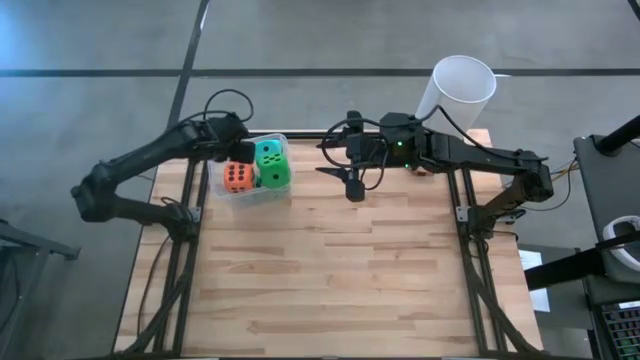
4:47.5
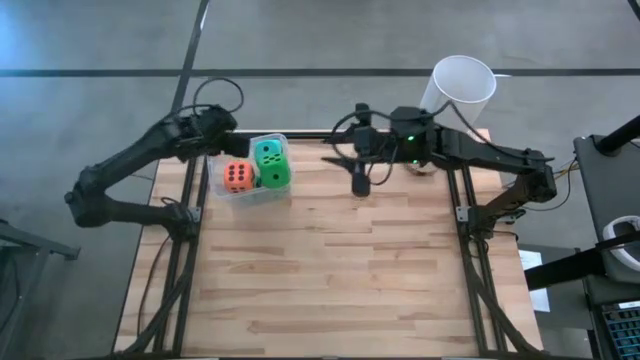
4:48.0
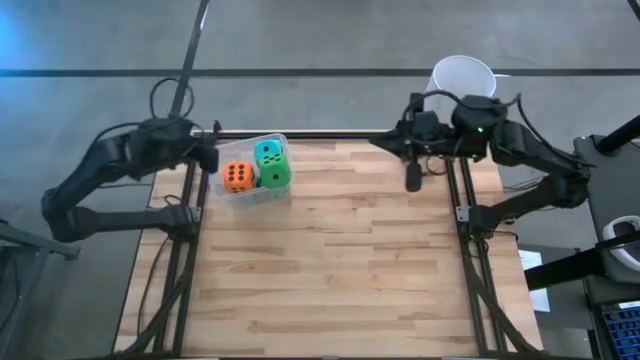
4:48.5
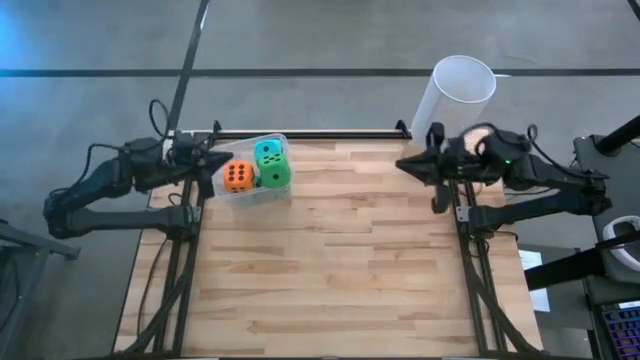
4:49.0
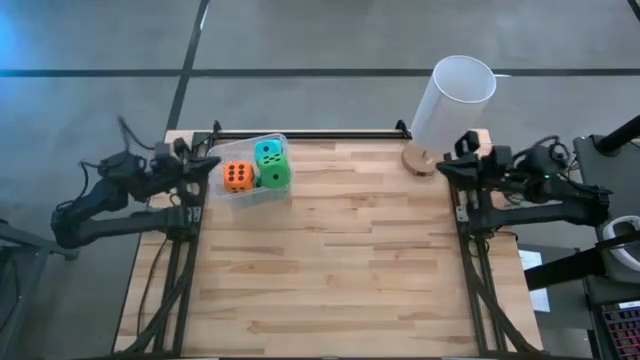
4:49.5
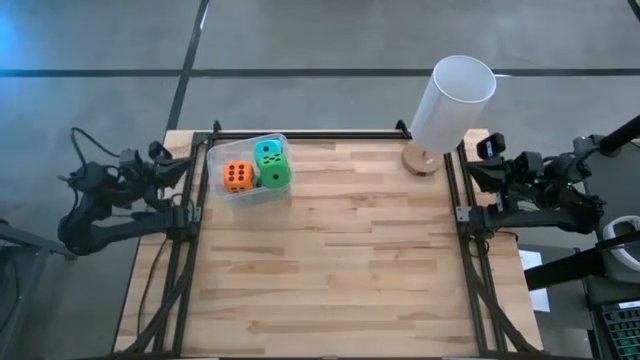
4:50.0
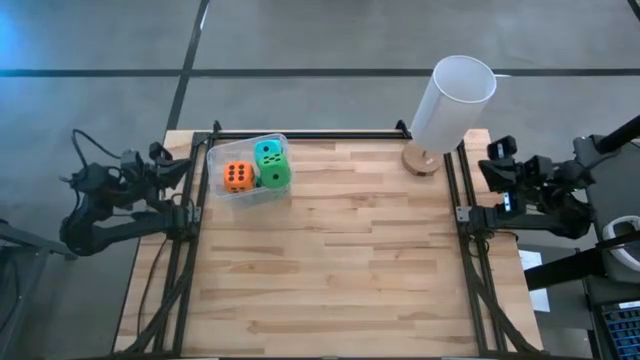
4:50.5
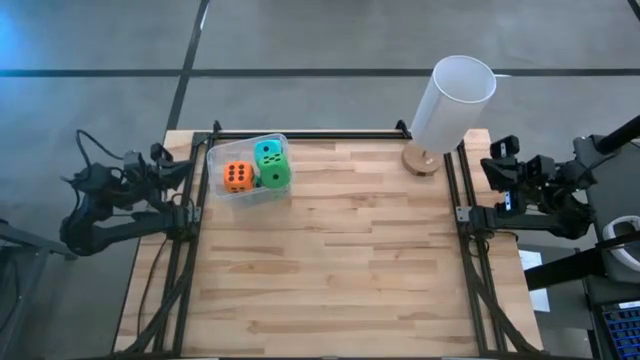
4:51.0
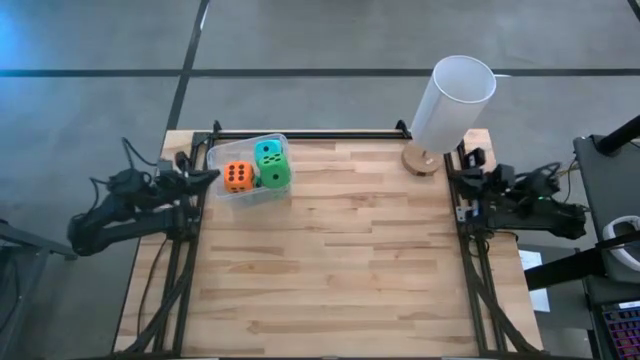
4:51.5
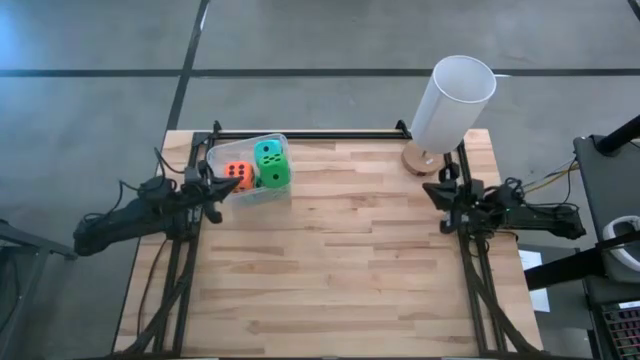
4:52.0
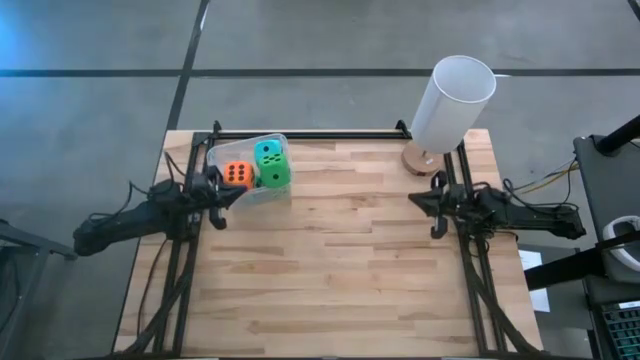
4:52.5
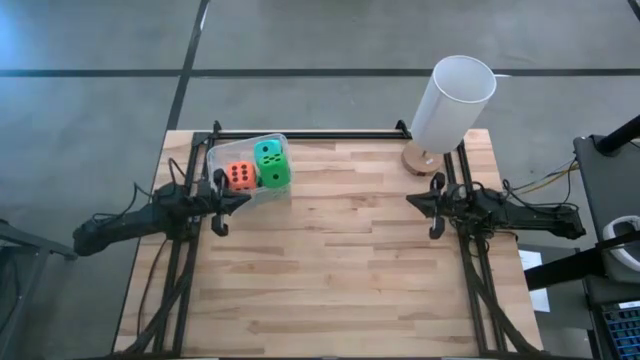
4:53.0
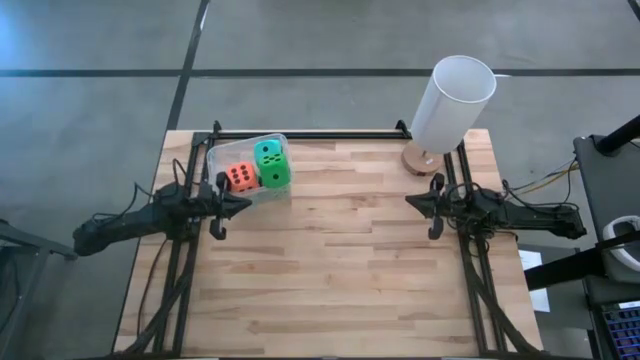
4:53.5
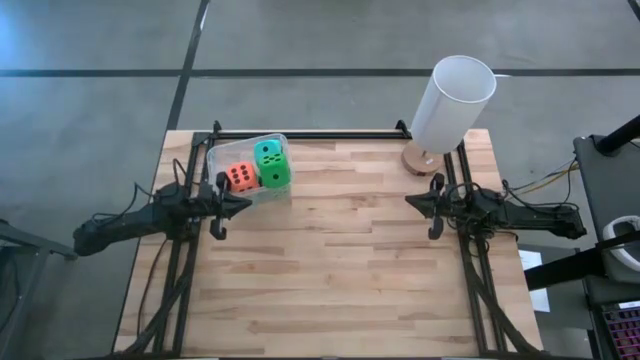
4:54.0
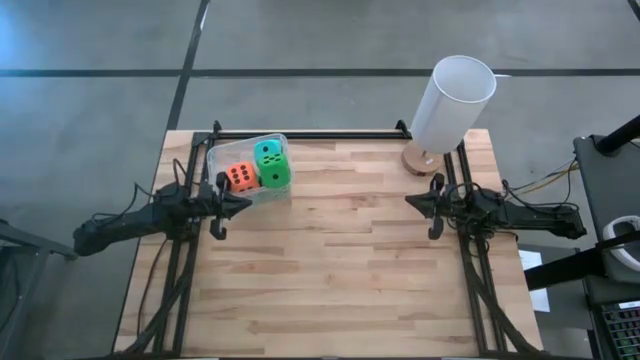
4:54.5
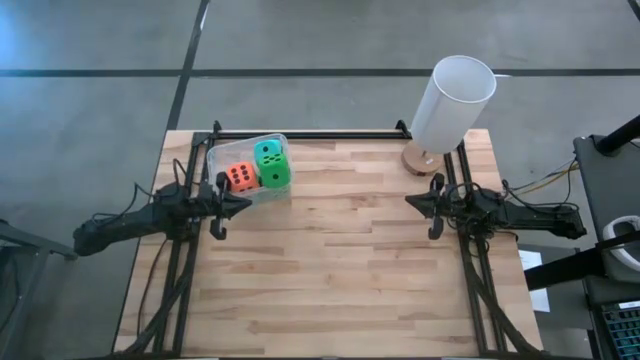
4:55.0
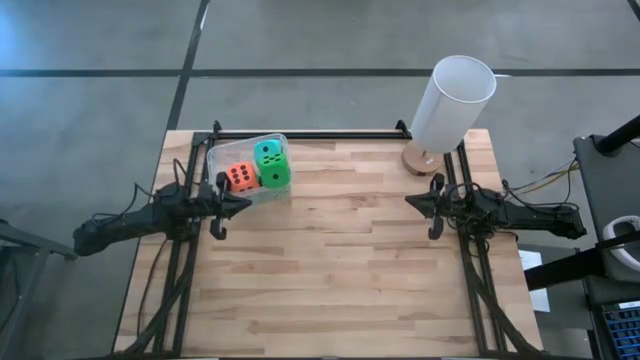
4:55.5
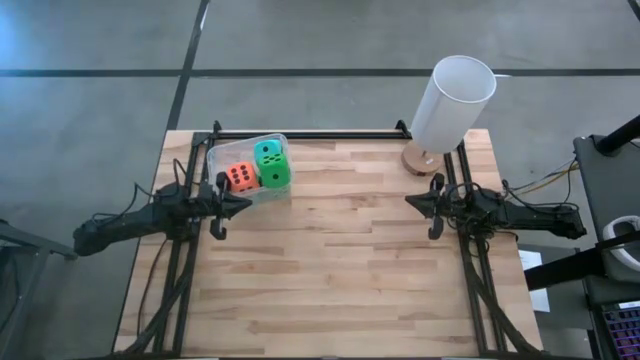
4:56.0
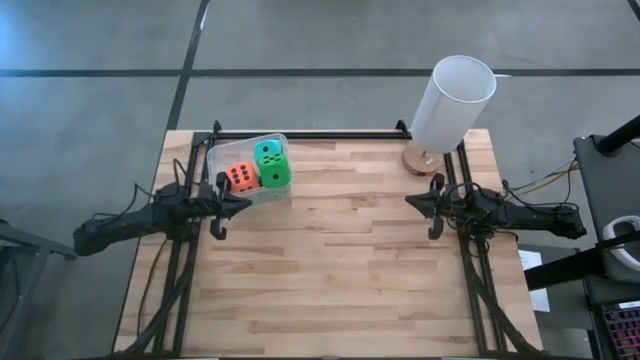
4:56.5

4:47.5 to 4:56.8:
Task: Pick & Place Dice
Return to Home Position

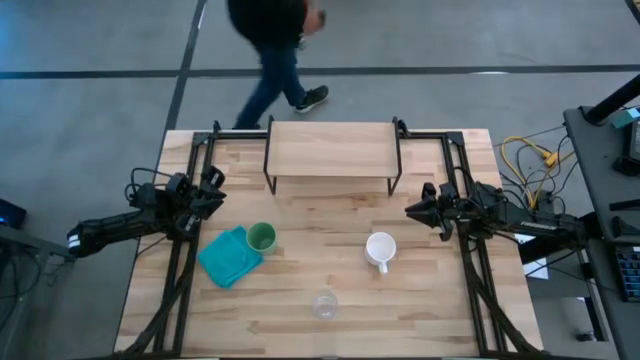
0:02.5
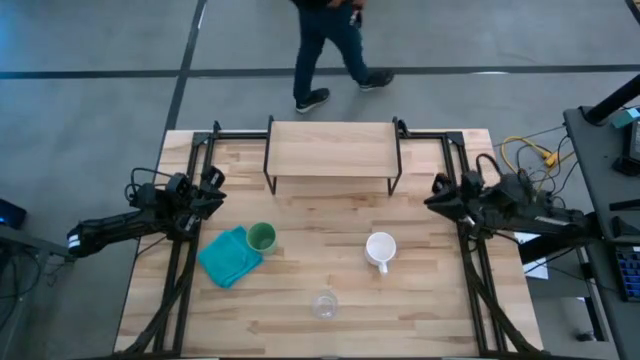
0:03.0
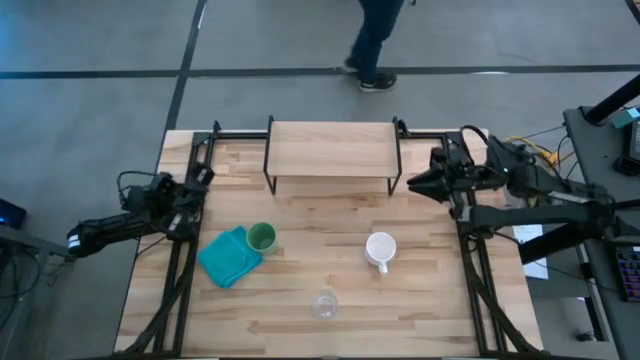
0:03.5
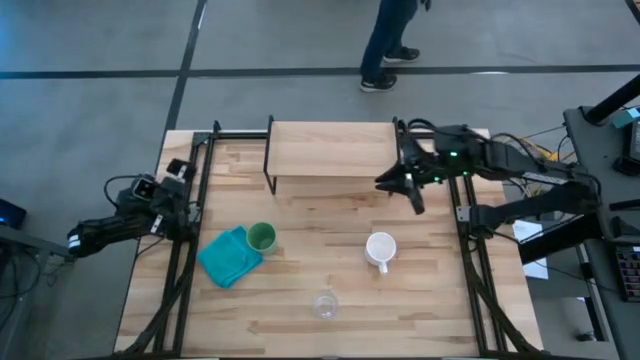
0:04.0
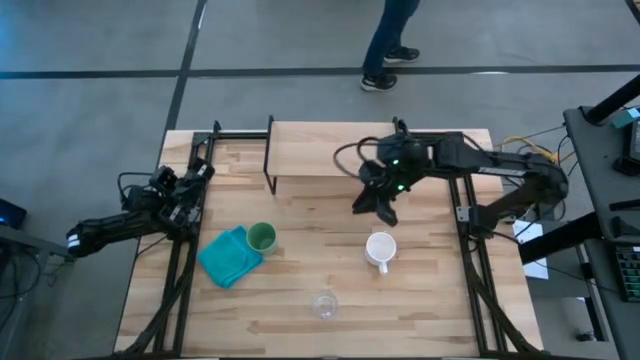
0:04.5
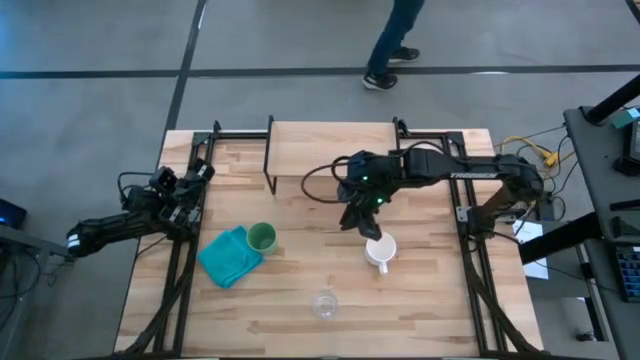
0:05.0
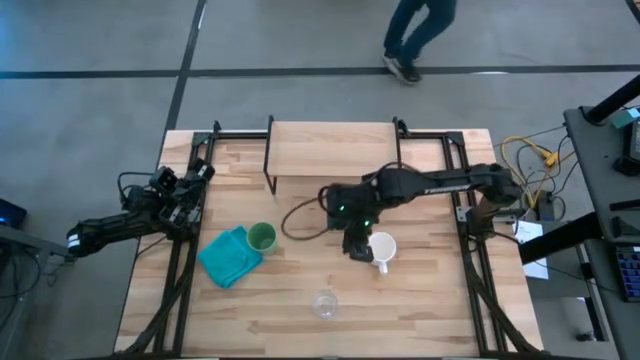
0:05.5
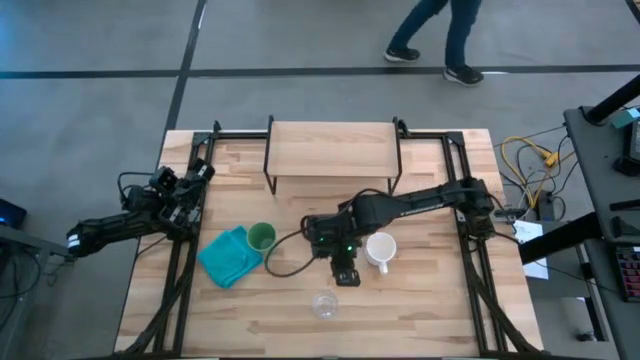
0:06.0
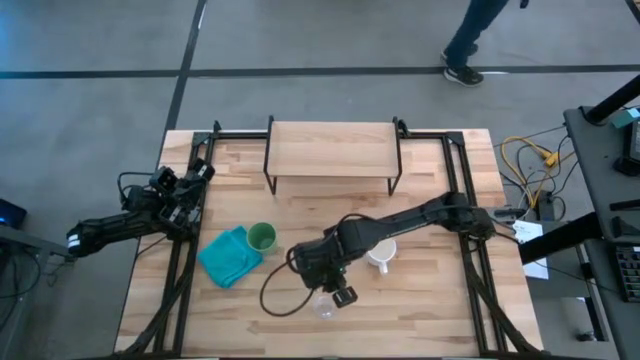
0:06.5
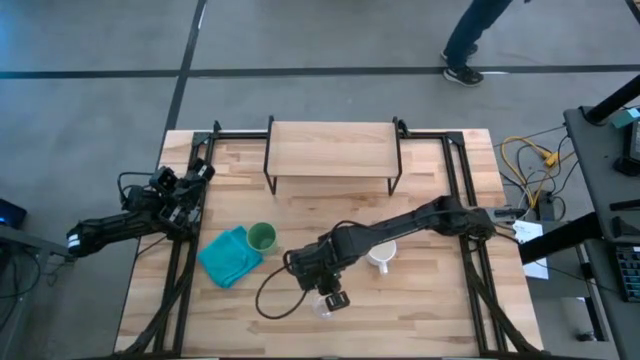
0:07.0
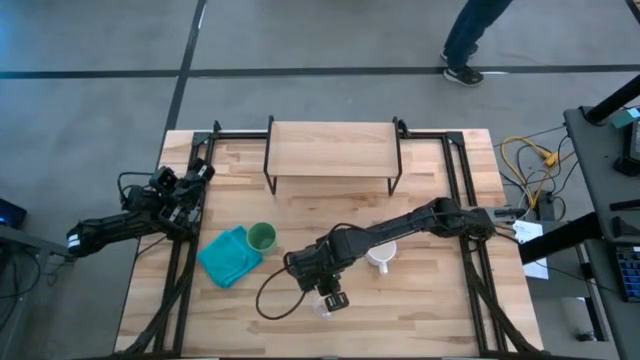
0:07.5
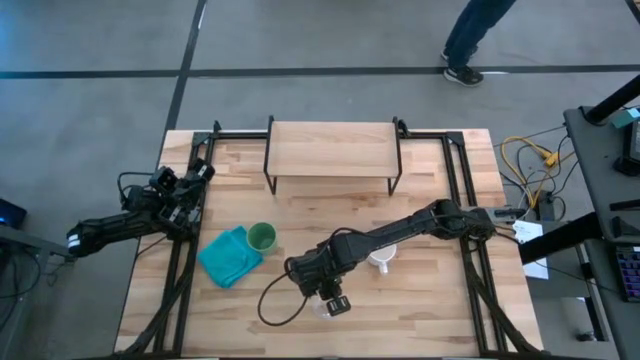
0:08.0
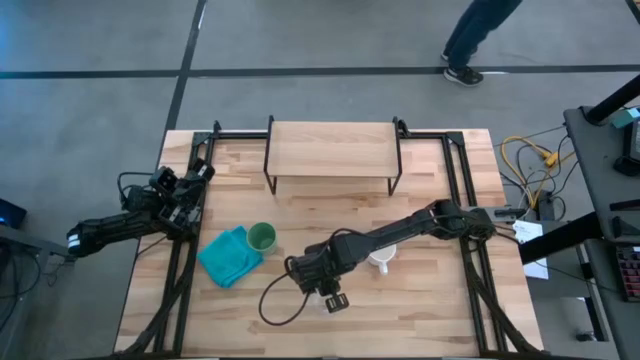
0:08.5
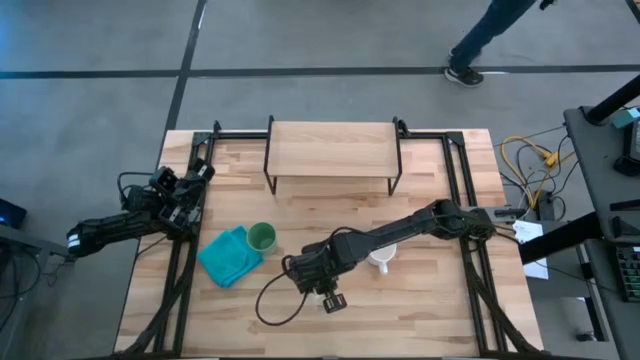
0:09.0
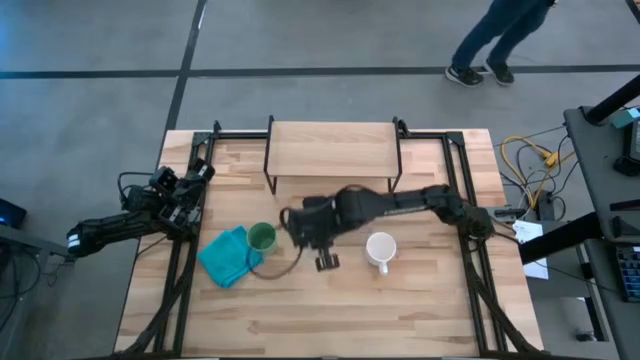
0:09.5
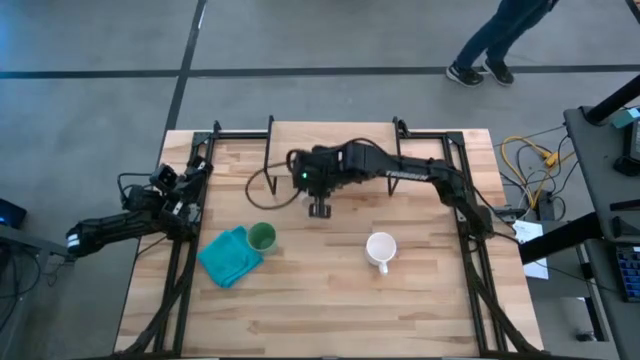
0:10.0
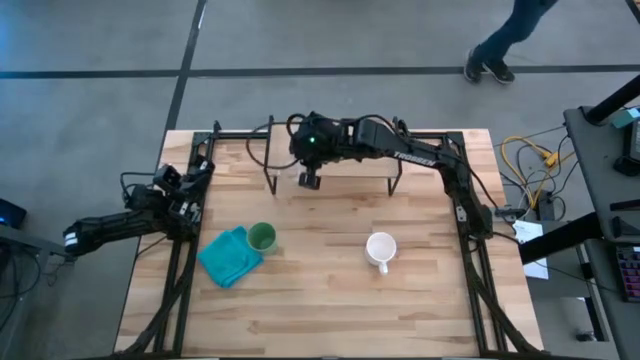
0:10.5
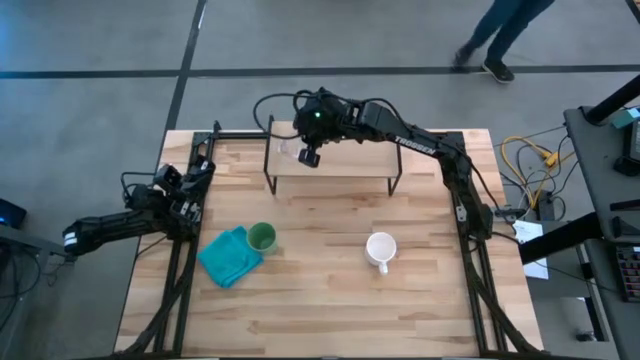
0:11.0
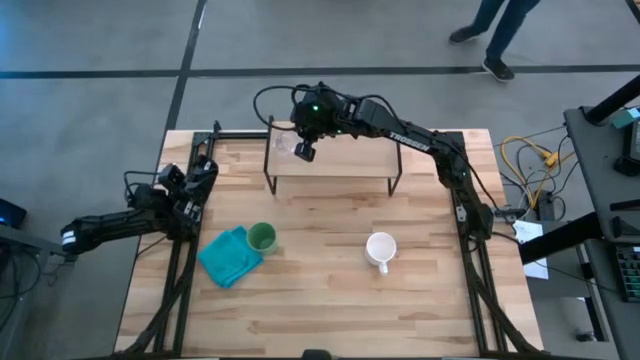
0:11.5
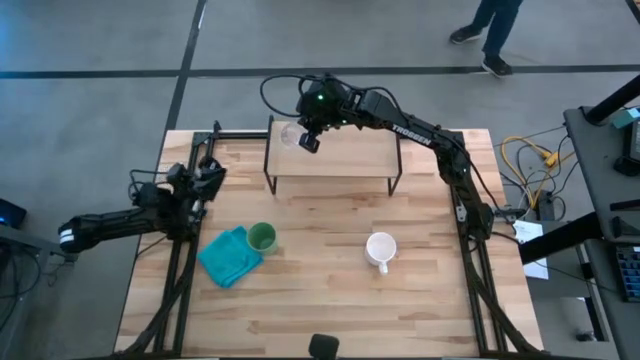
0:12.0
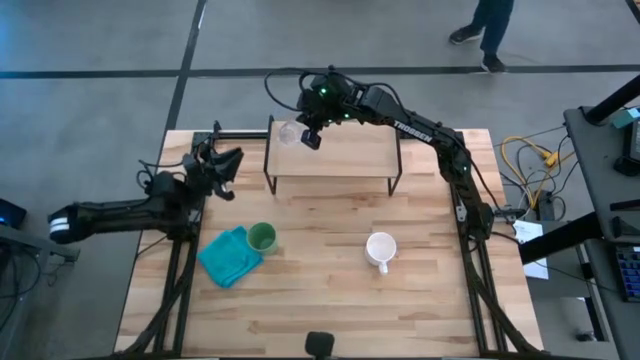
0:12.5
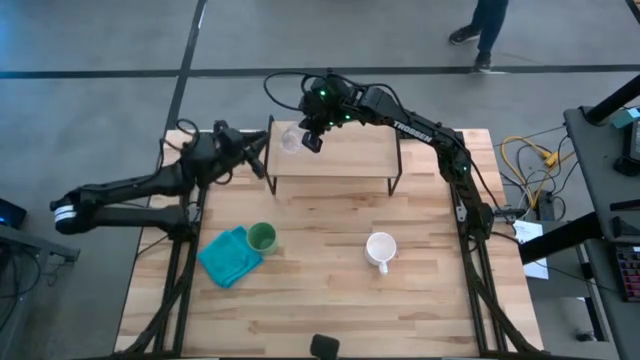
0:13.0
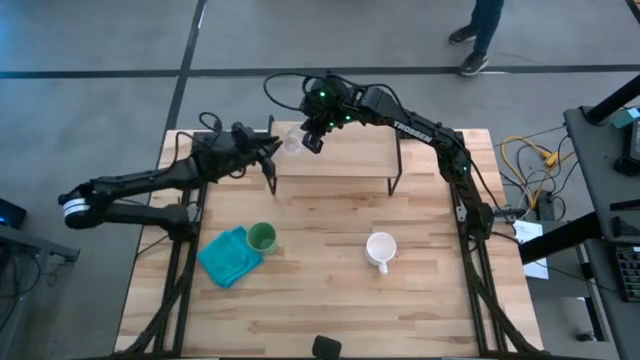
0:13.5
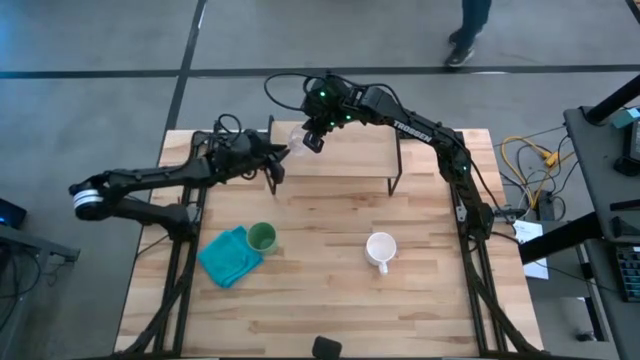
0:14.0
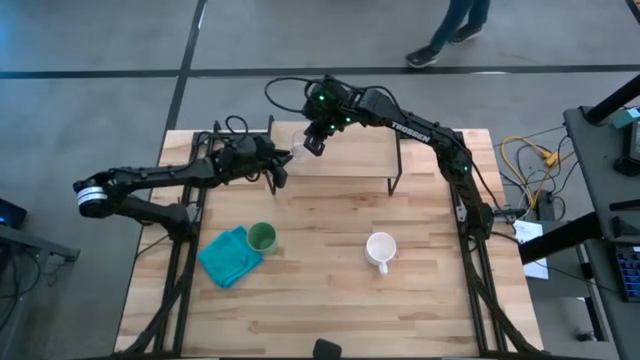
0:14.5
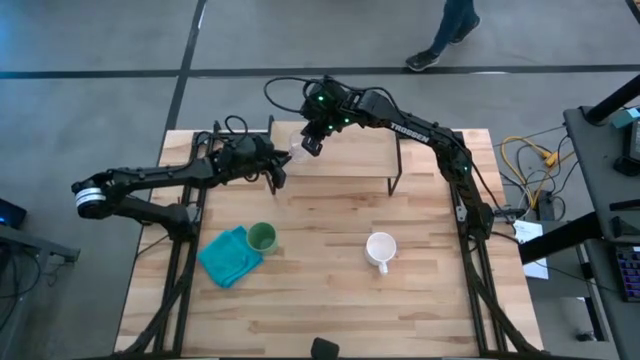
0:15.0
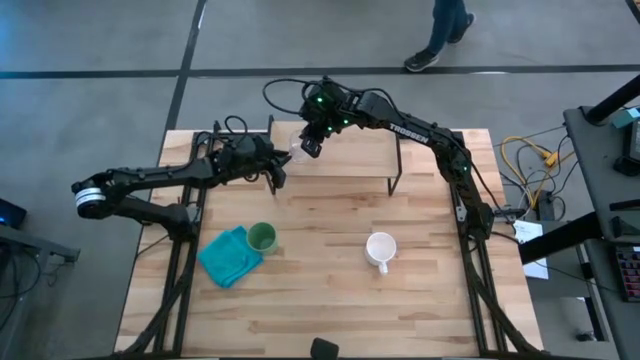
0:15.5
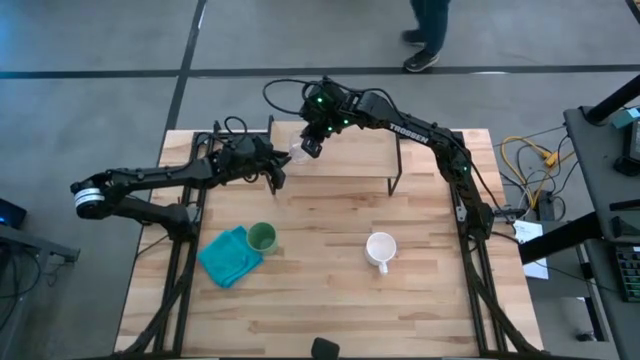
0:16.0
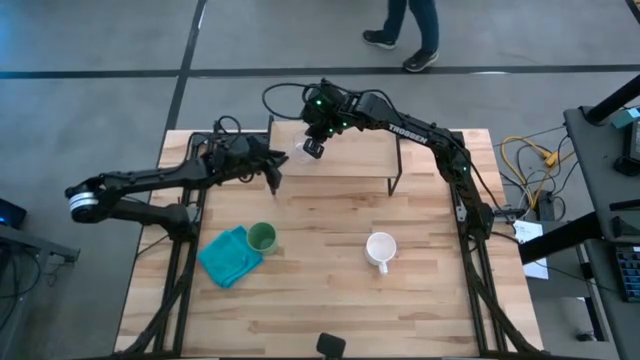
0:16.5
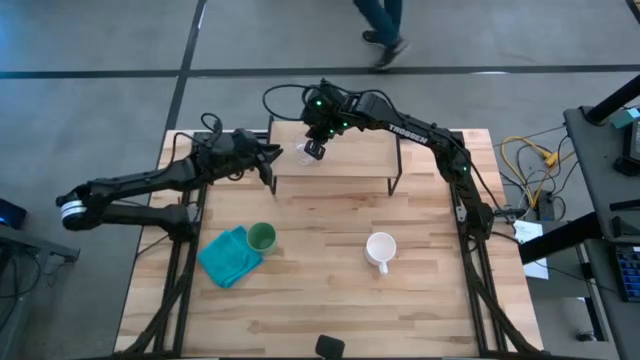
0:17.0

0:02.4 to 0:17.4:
Task: Stack small to large cups/mugs on shelf
Put the transparent mug on the shelf
